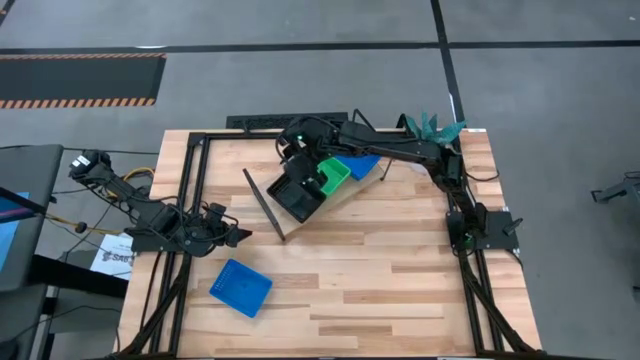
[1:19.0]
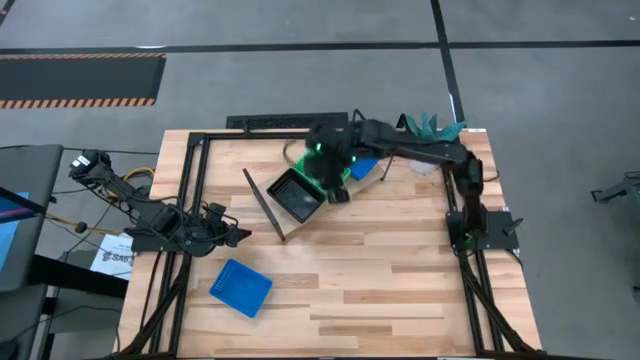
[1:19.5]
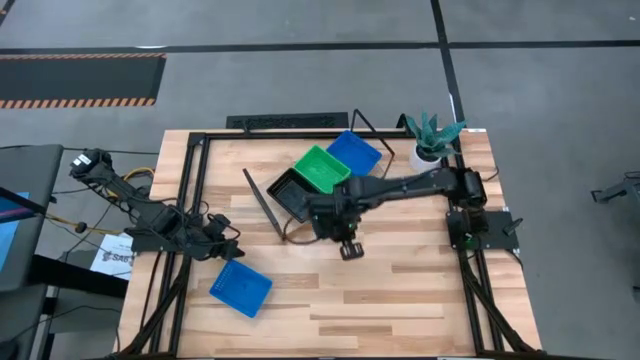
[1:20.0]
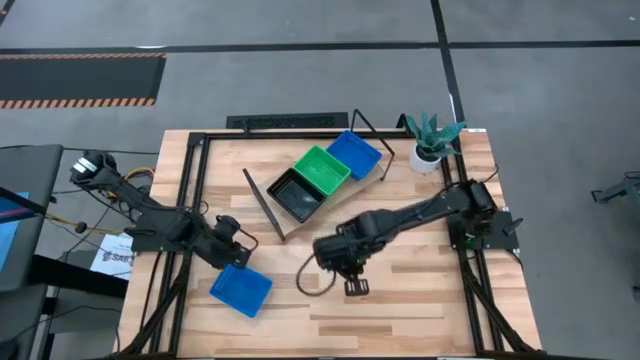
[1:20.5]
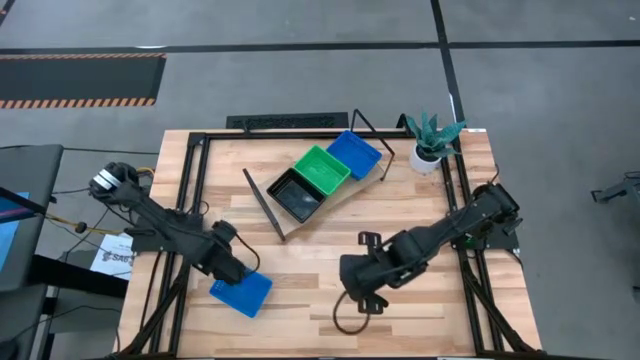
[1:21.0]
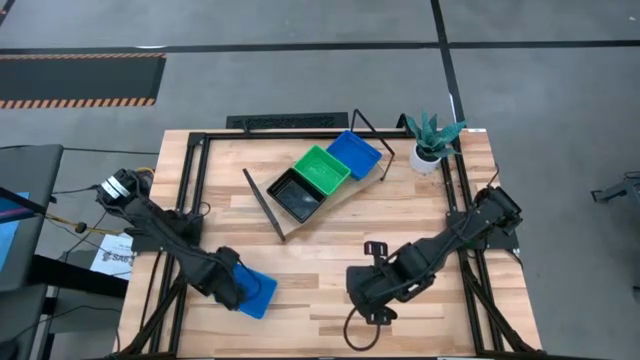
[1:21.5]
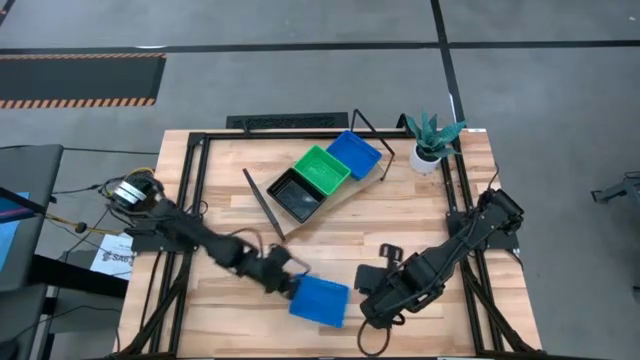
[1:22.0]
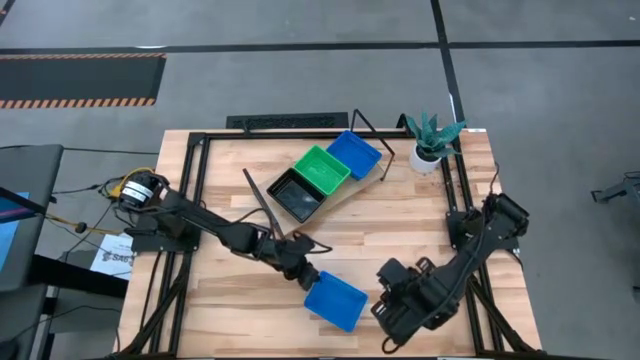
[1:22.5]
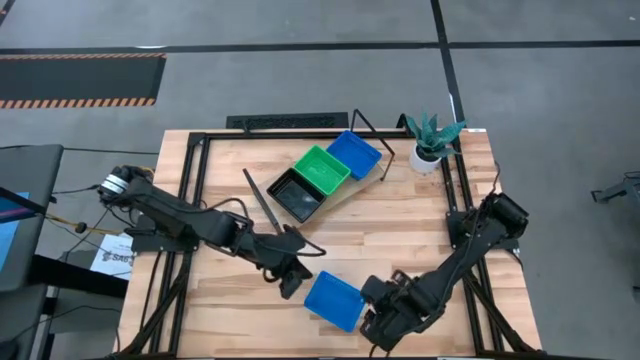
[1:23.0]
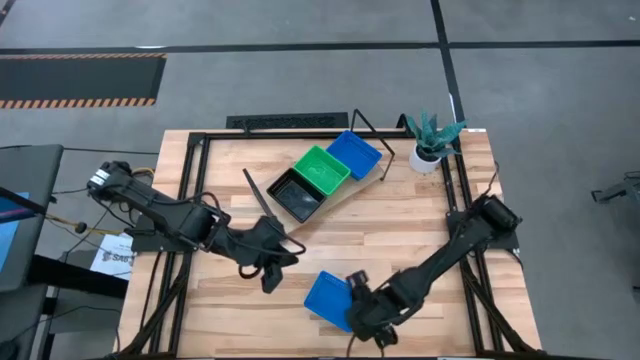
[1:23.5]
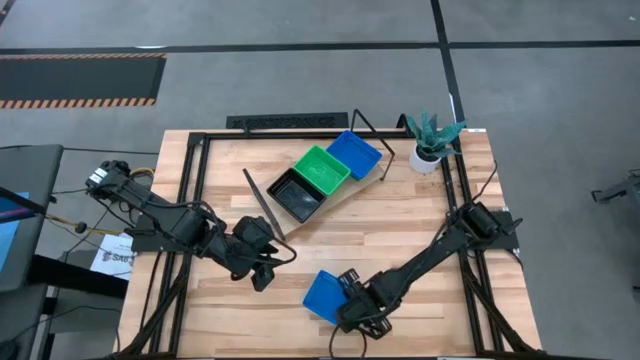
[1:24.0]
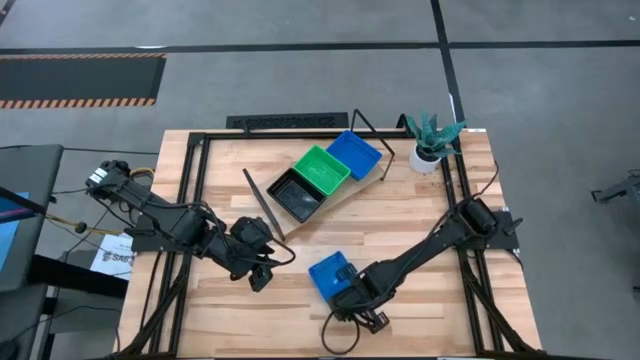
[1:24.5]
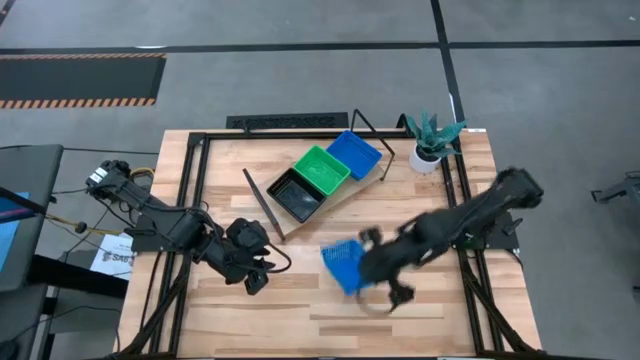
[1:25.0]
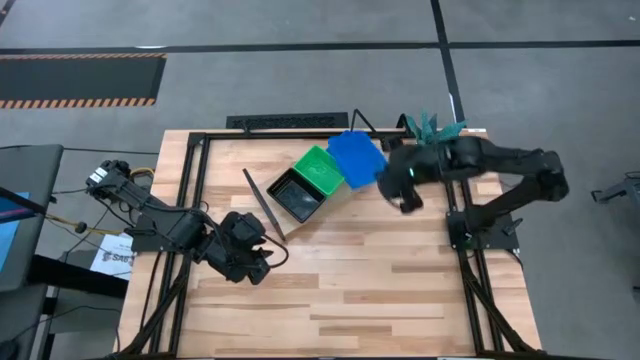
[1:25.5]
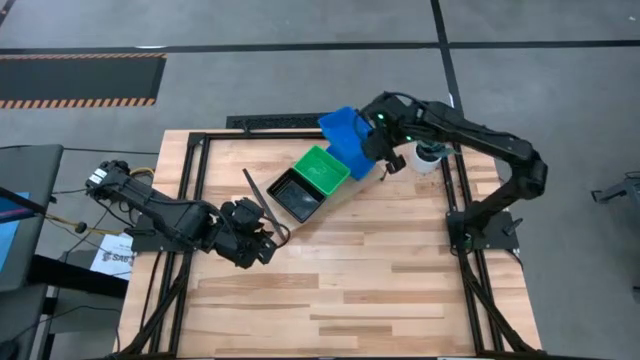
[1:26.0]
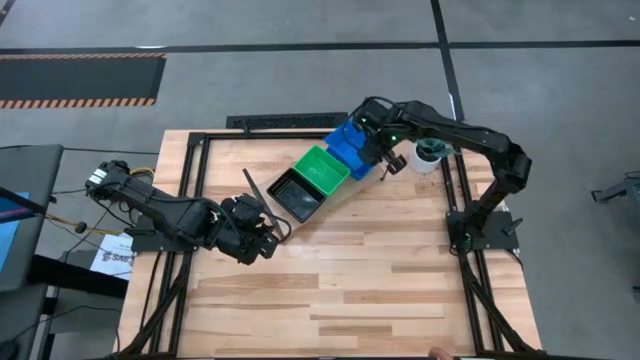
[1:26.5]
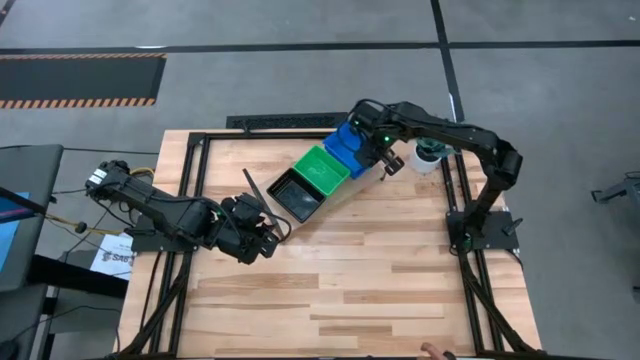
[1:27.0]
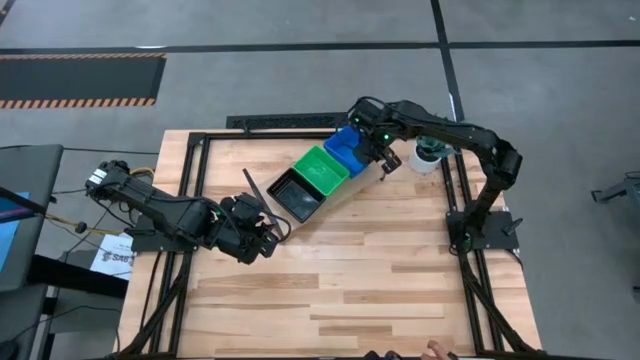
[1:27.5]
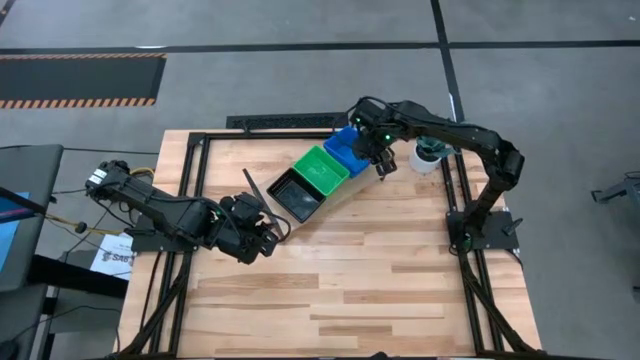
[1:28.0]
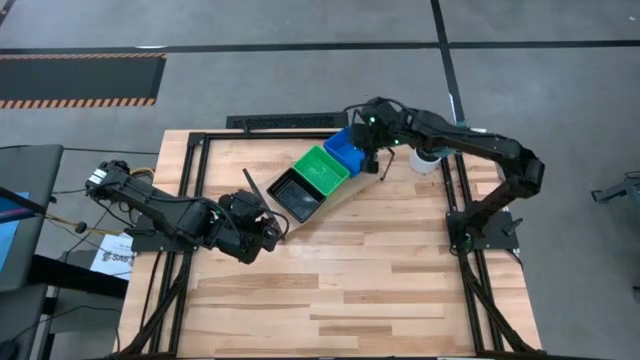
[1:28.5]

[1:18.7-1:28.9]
Task: Stack baskets on shelf by color
Stack the blue bin on top of the other blue bins on the shelf

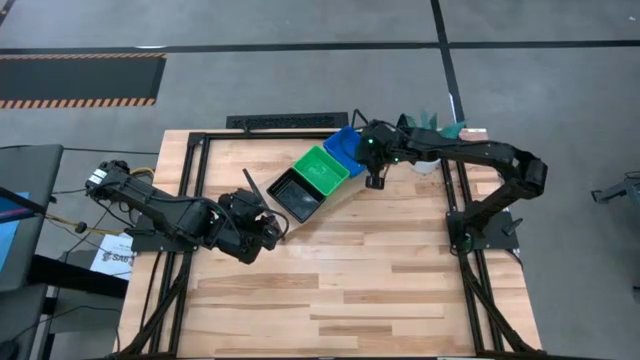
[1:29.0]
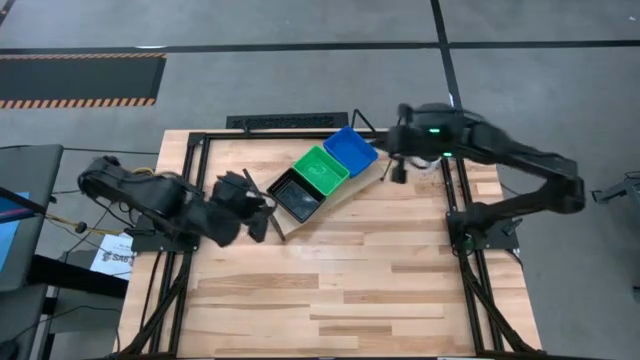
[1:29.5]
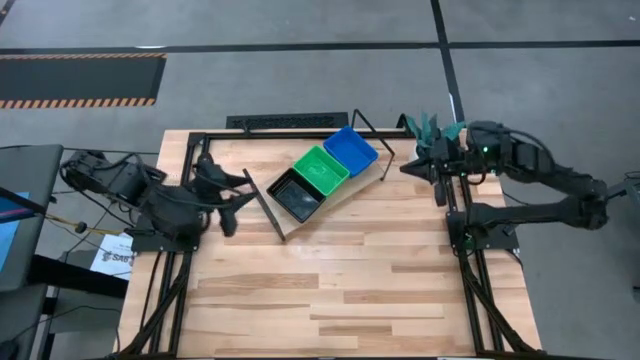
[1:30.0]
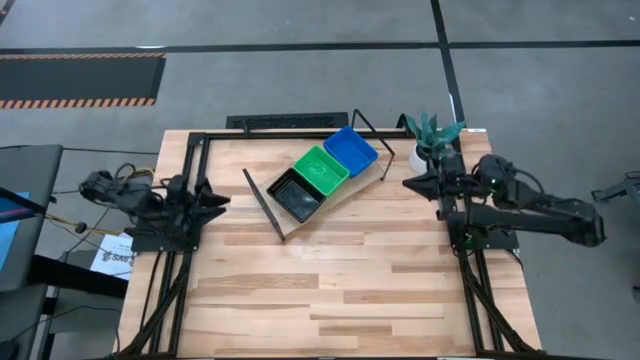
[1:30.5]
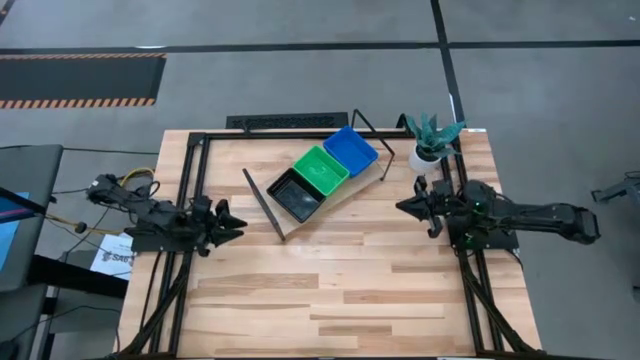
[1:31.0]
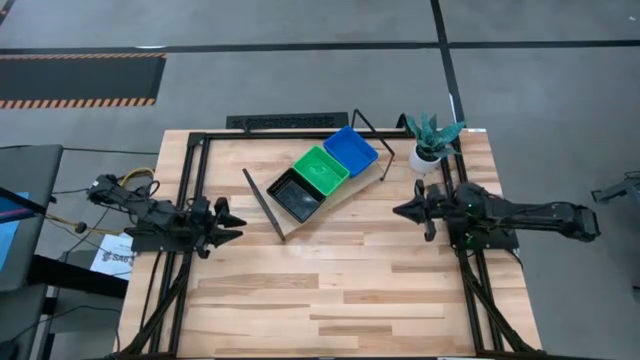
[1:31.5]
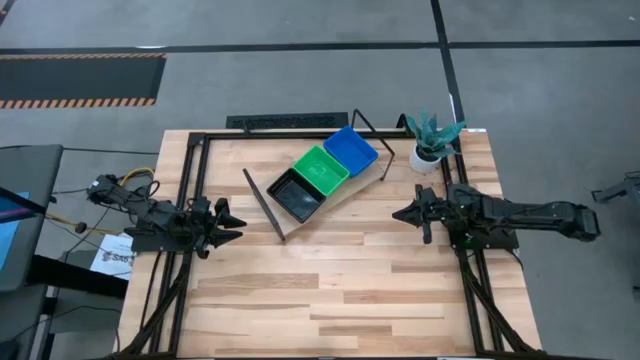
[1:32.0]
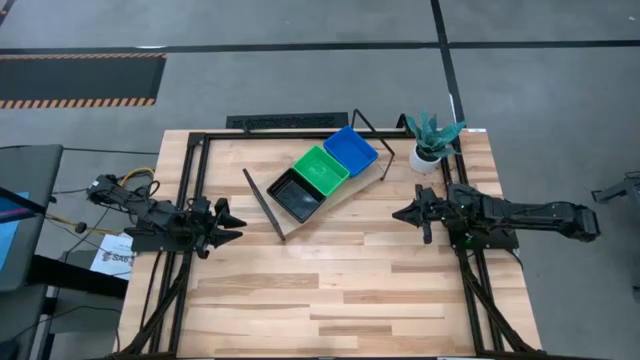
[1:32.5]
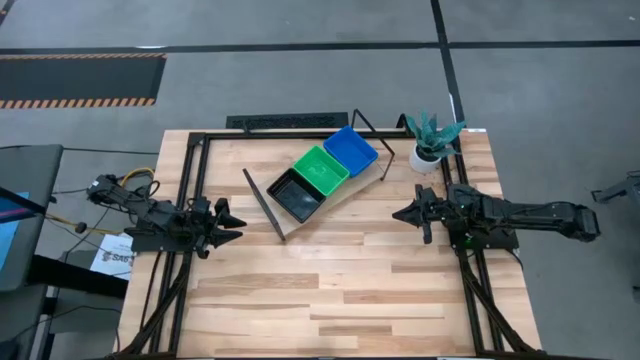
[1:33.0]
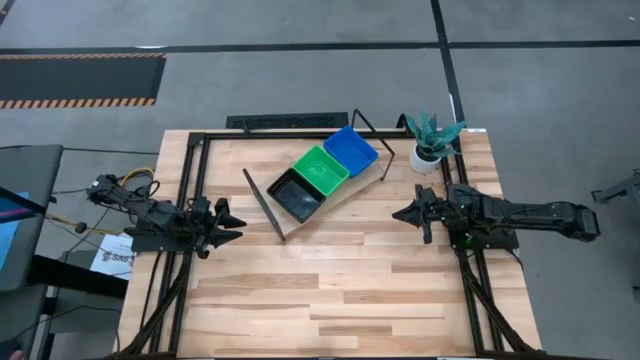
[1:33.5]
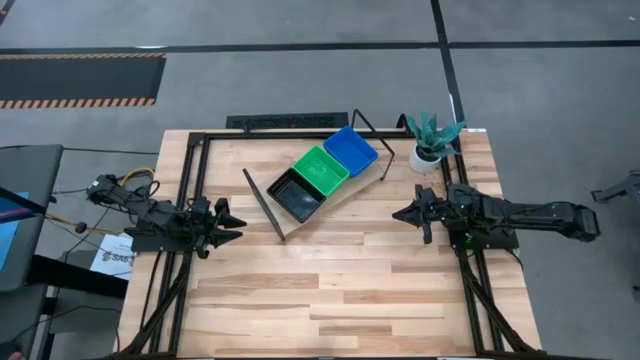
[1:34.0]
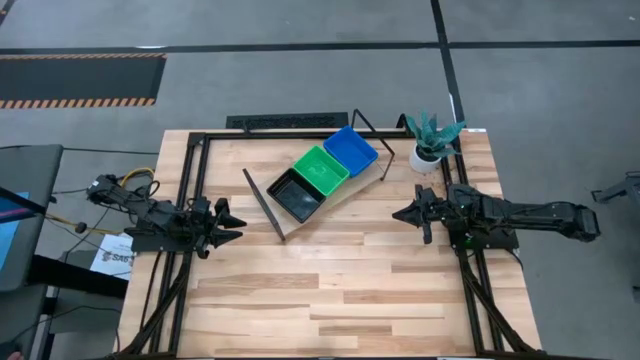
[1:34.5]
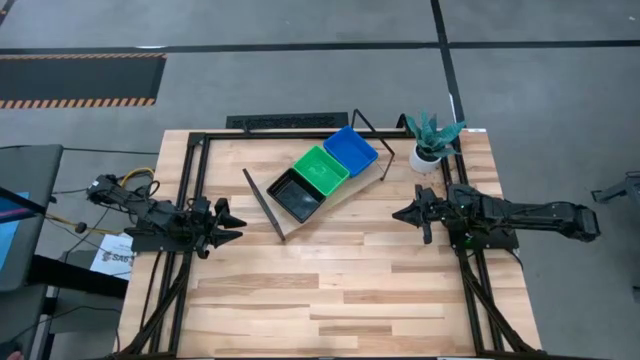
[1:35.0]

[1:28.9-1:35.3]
Return to Home Position
